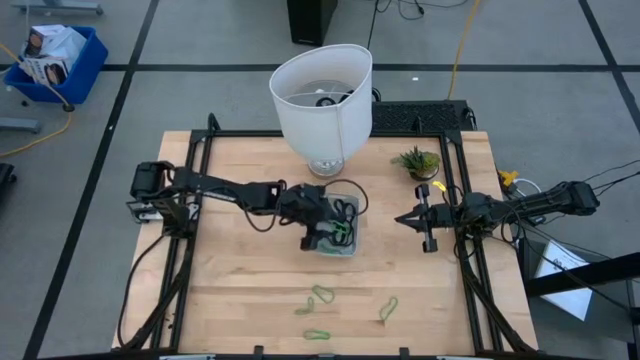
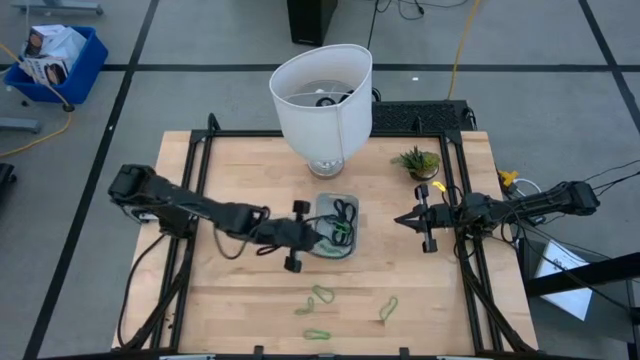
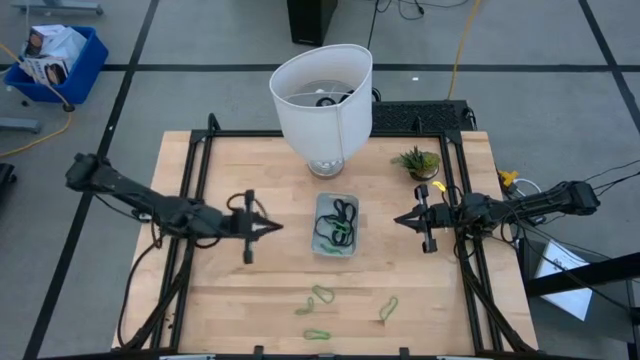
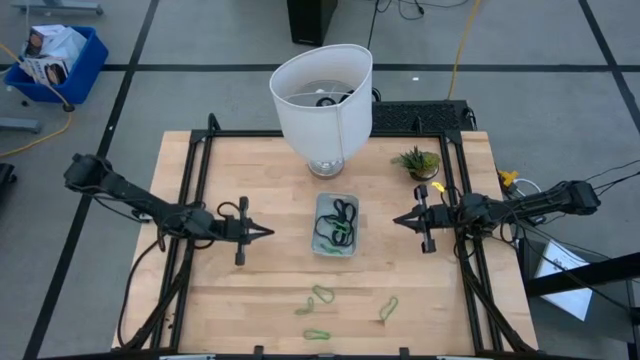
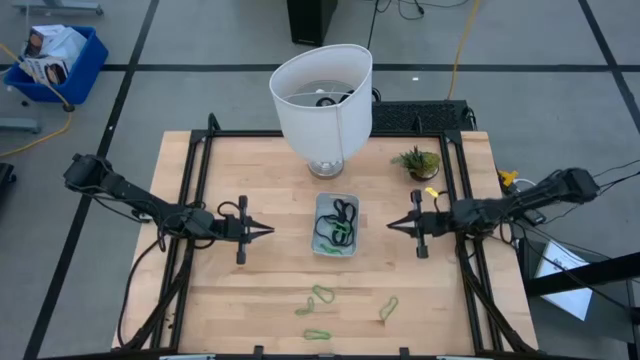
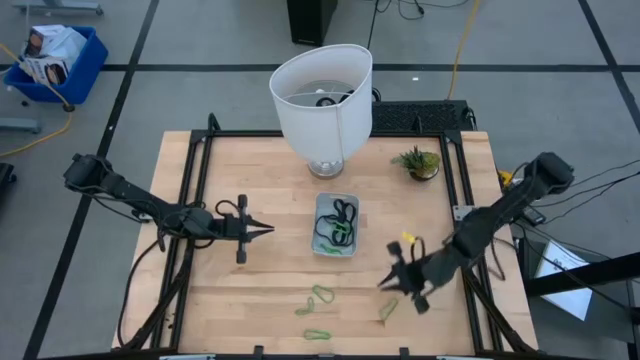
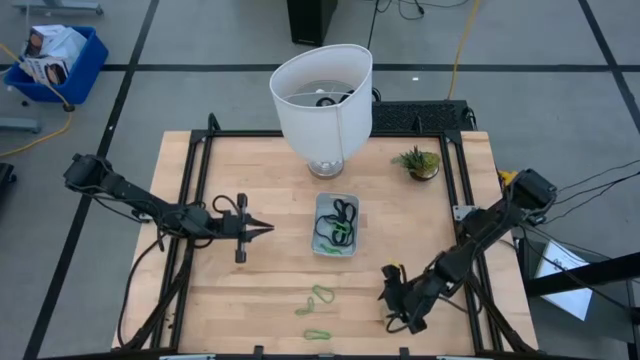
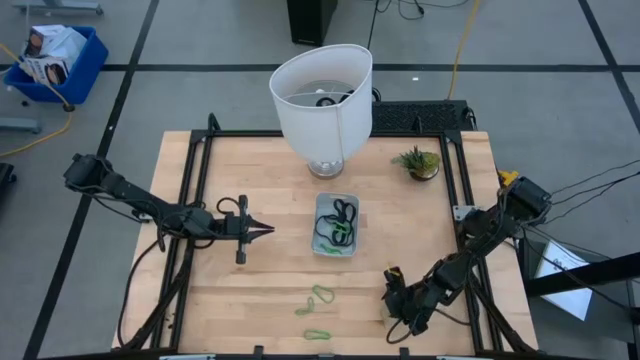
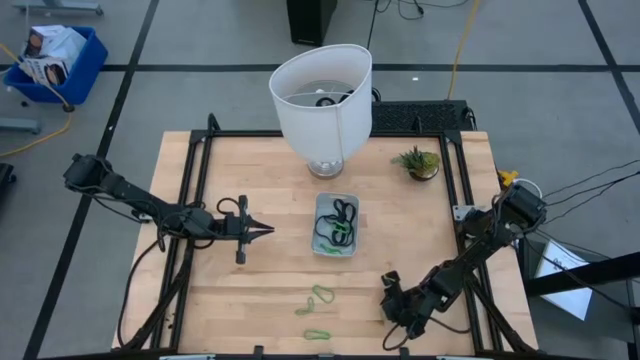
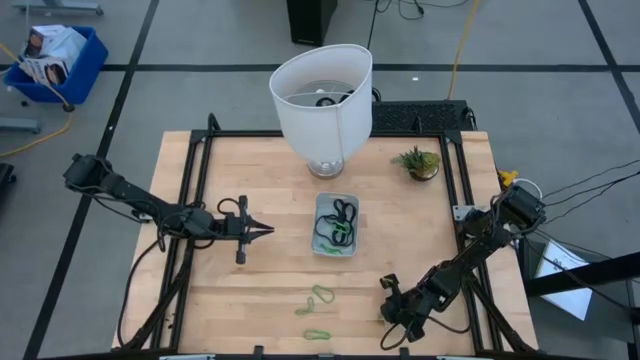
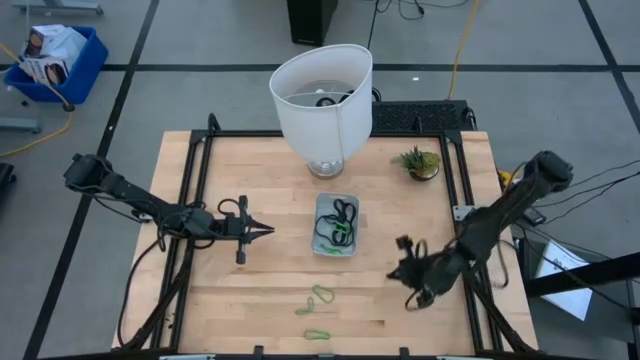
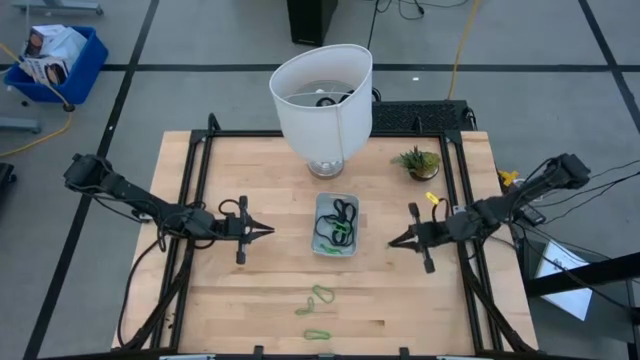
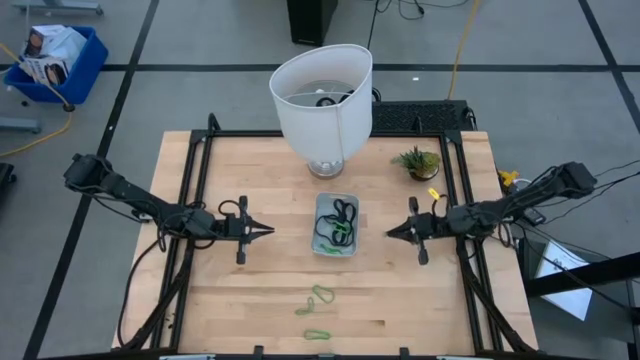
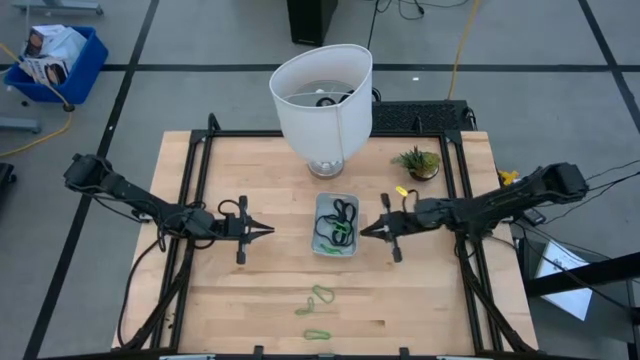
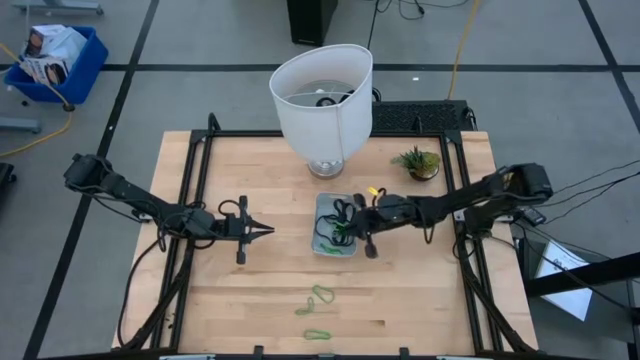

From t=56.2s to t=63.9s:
Task: Pick and place rubber bands into bin
Put the green rubber band into the gray bin

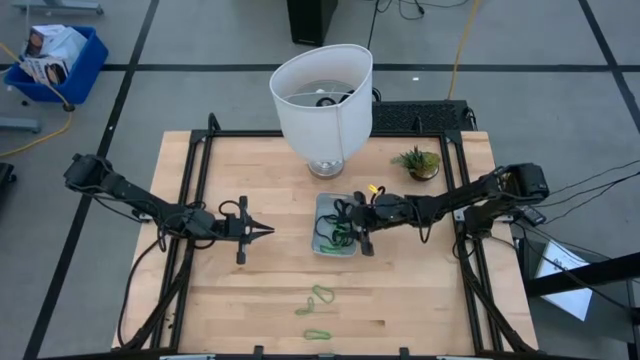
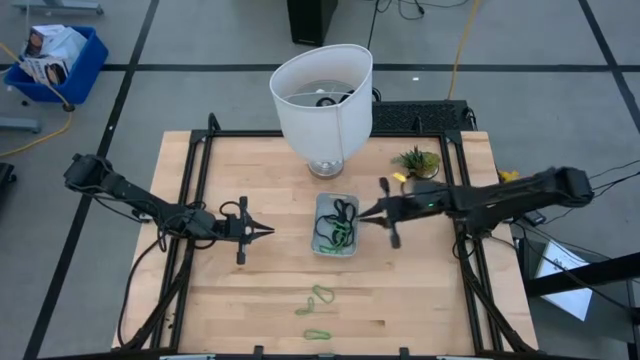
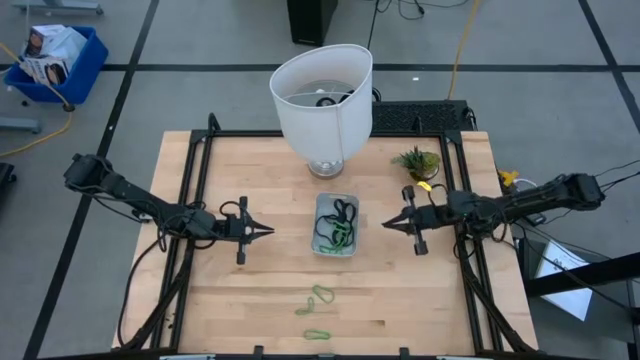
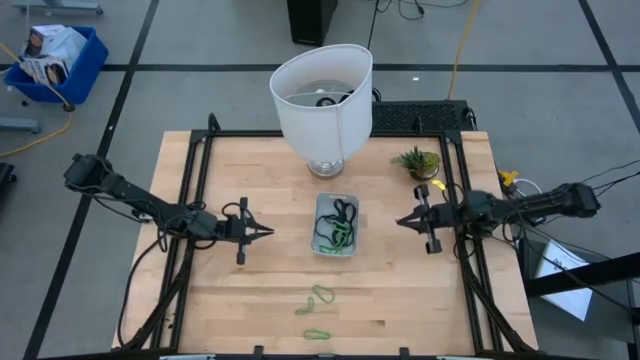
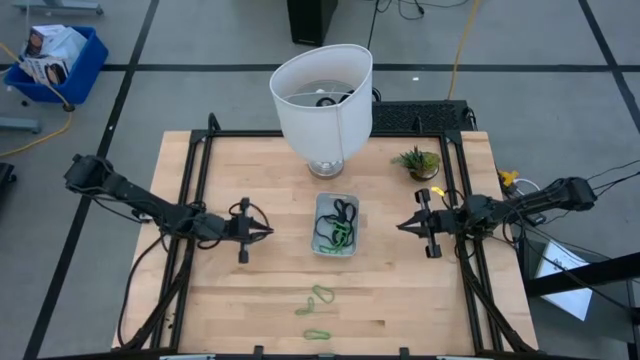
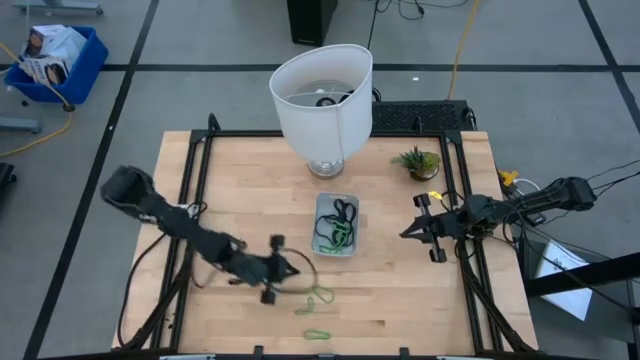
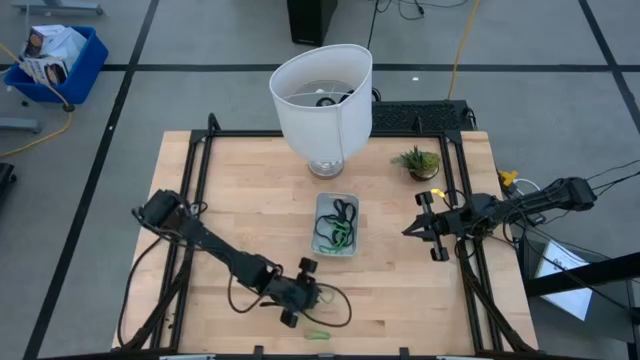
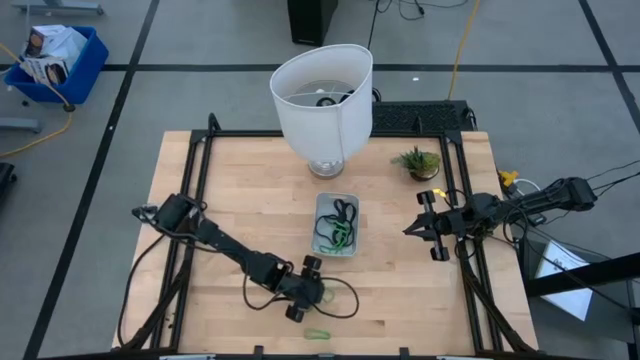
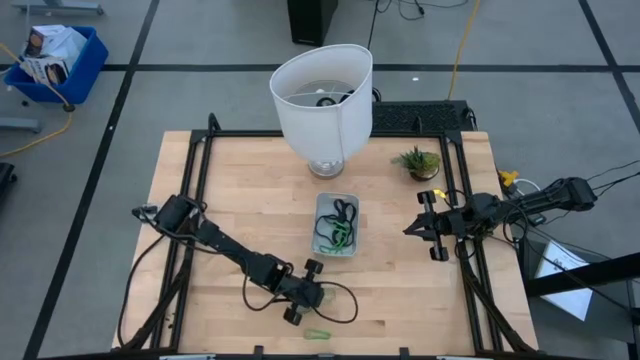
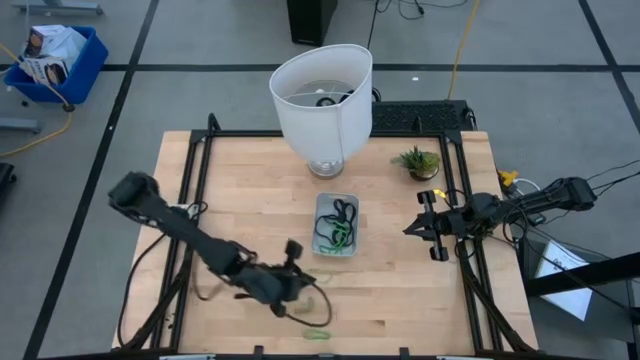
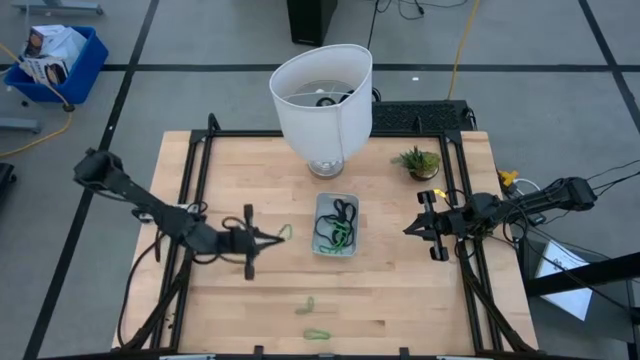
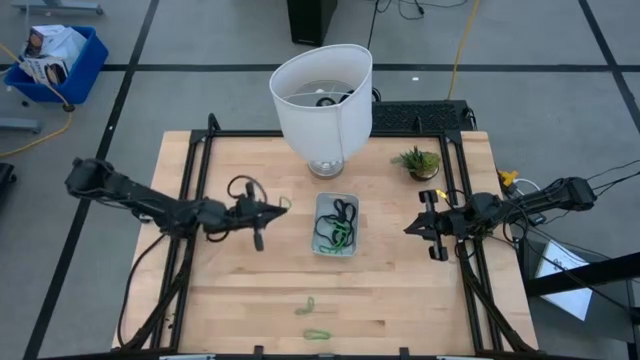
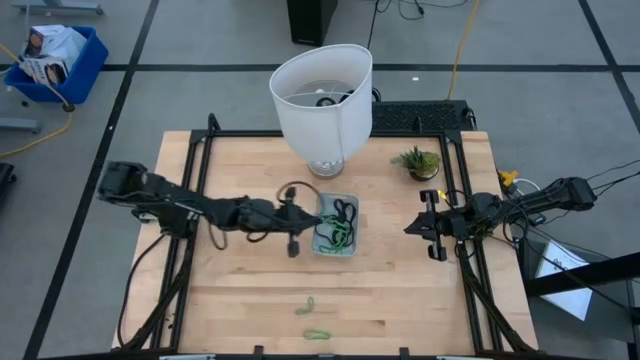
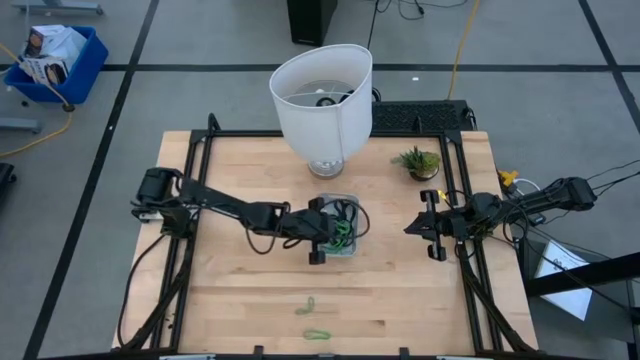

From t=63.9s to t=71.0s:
Put the green rubber band into the gray bin

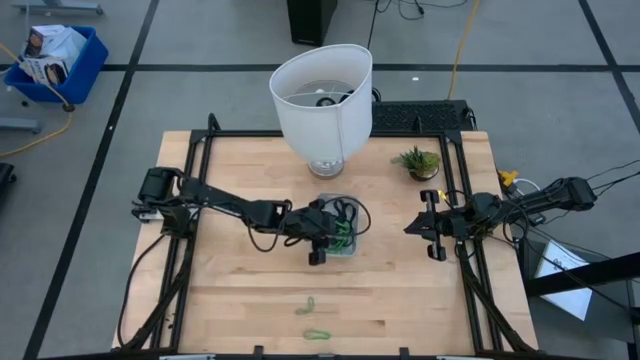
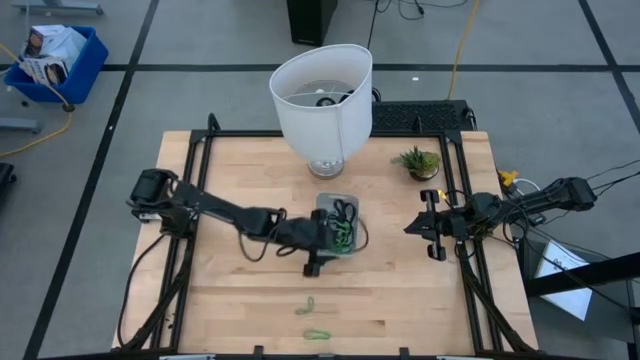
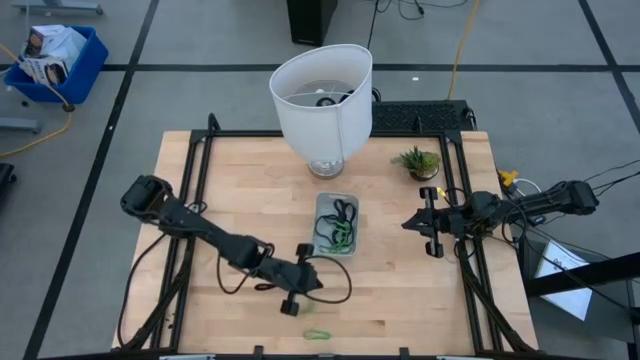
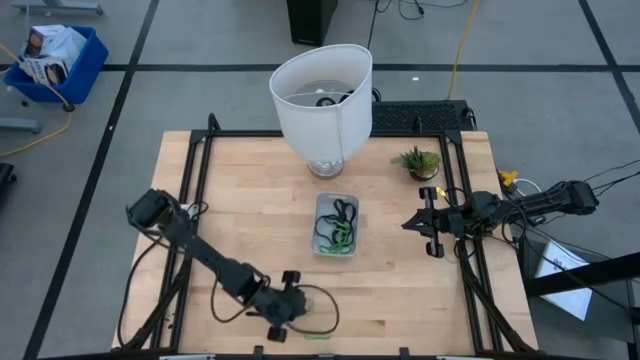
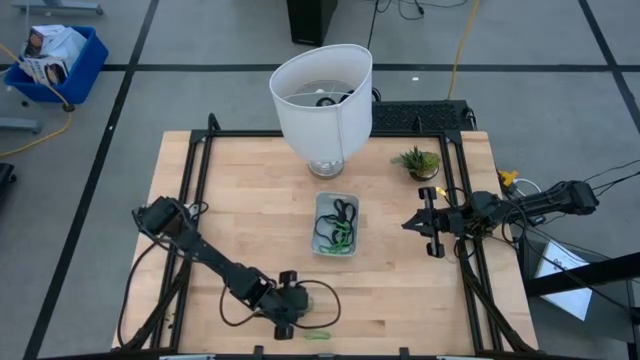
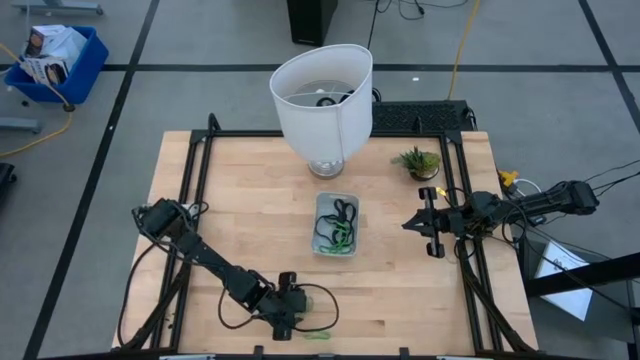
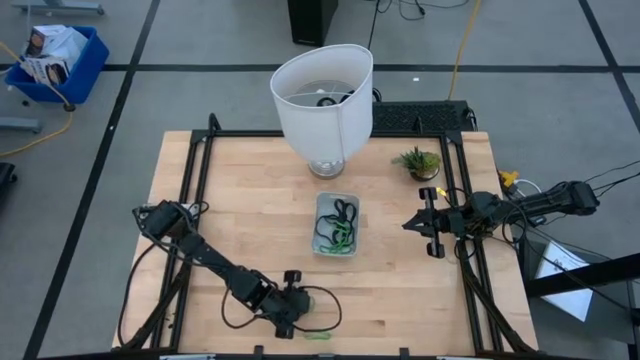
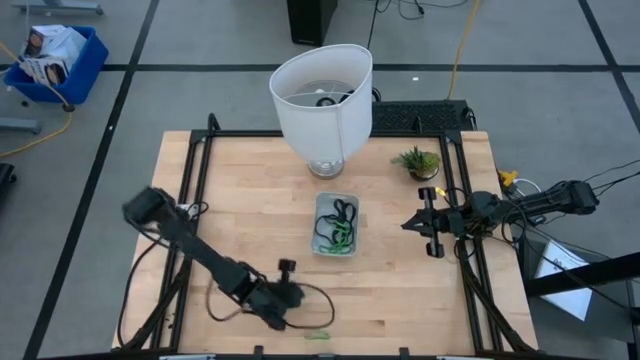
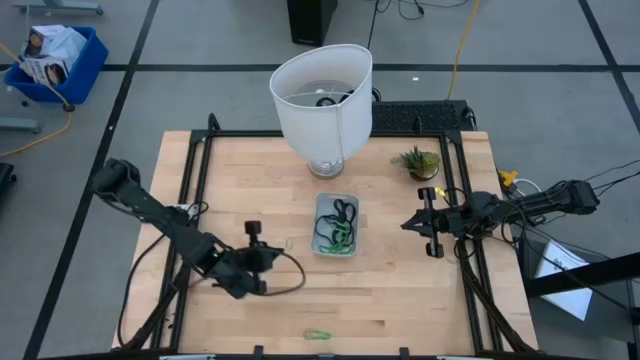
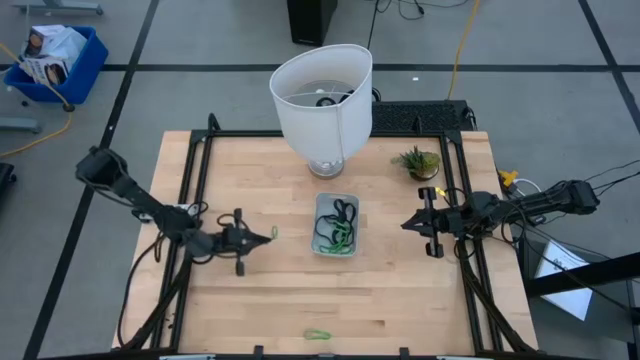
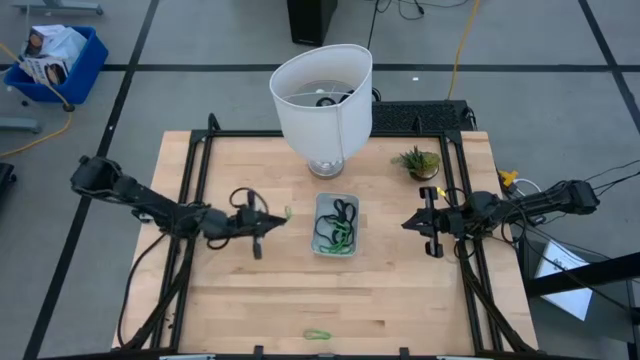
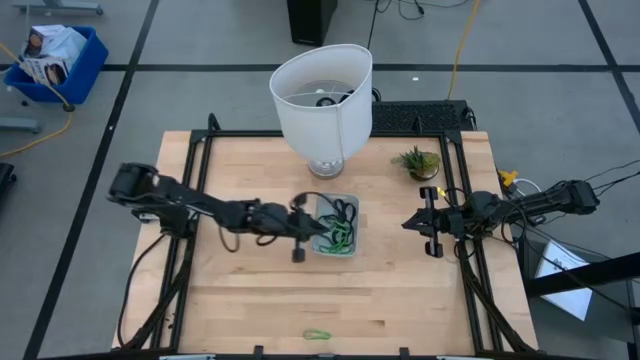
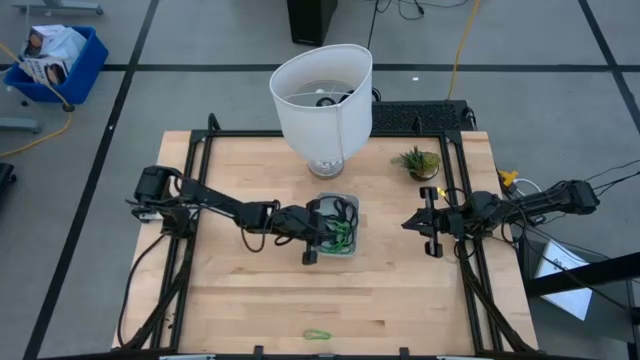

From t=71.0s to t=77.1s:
Put the green rubber band into the gray bin

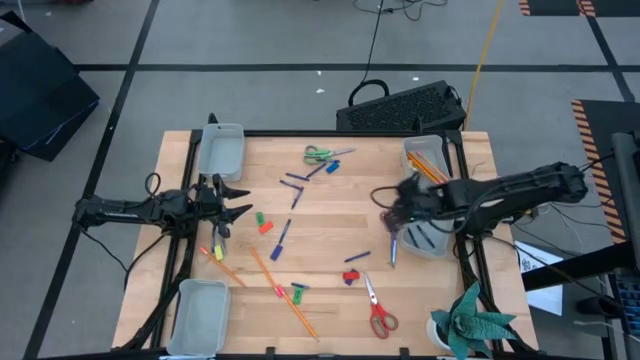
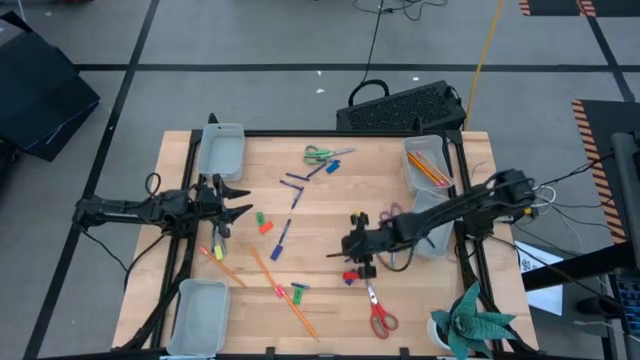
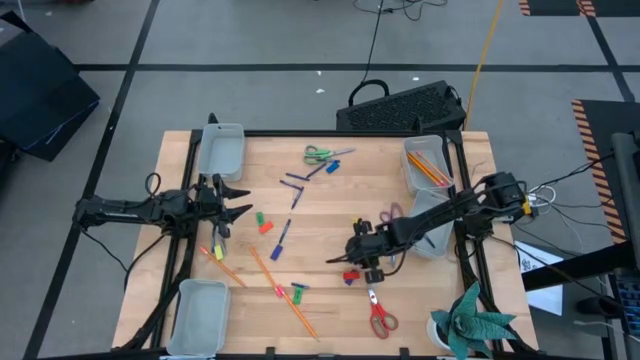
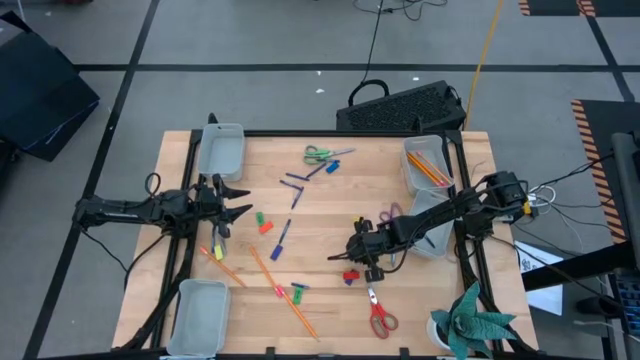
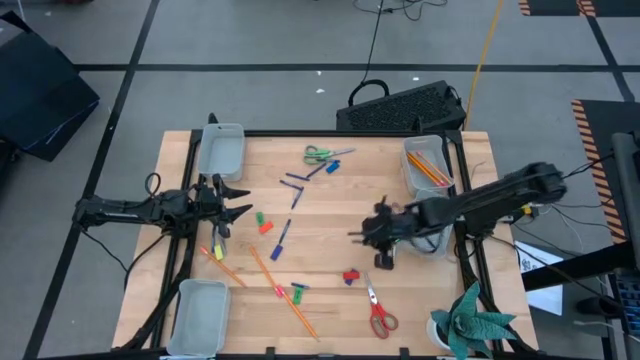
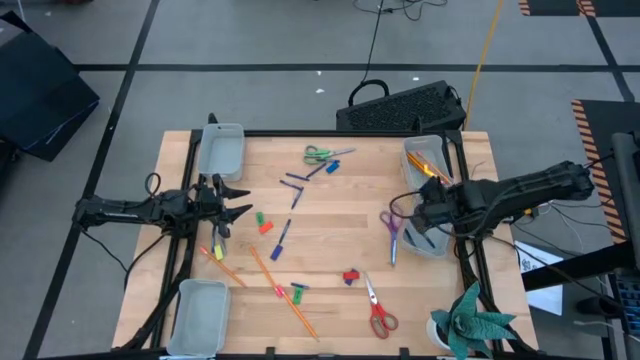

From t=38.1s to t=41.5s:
Task: Sort crayons/erasers/pens/pencils in bins
Put the blue crayon into the middle right gray bin
